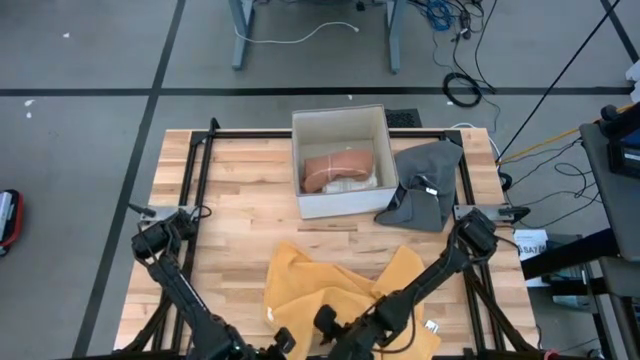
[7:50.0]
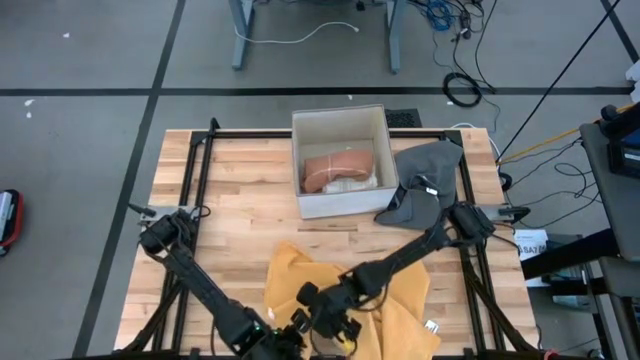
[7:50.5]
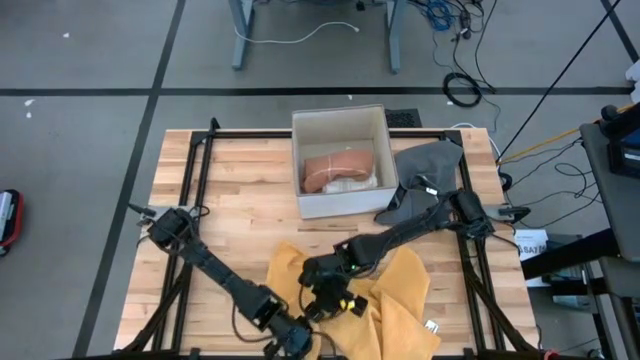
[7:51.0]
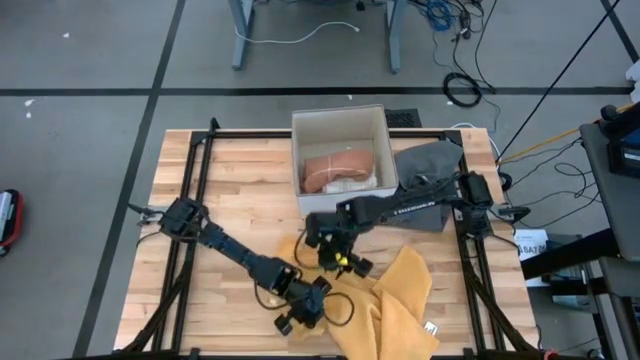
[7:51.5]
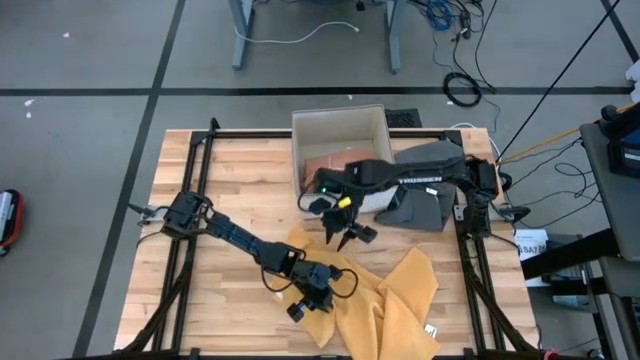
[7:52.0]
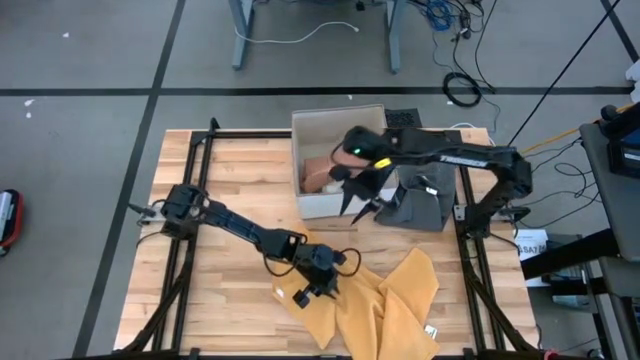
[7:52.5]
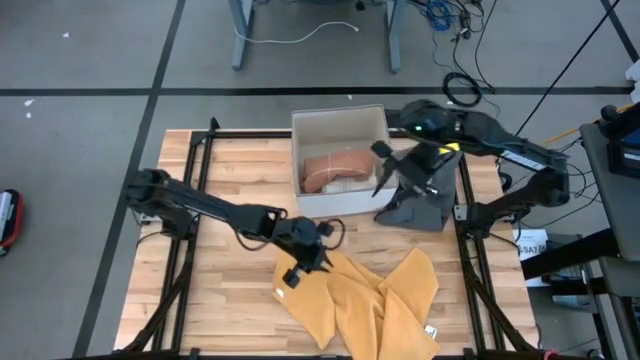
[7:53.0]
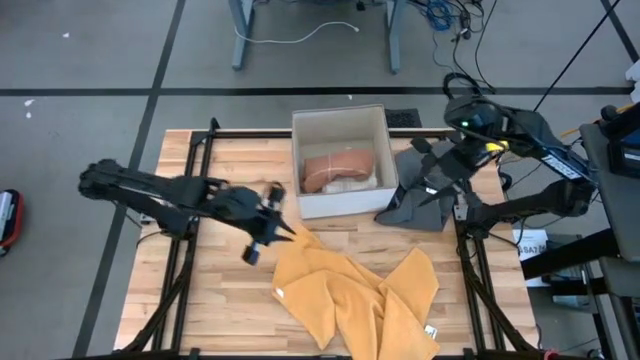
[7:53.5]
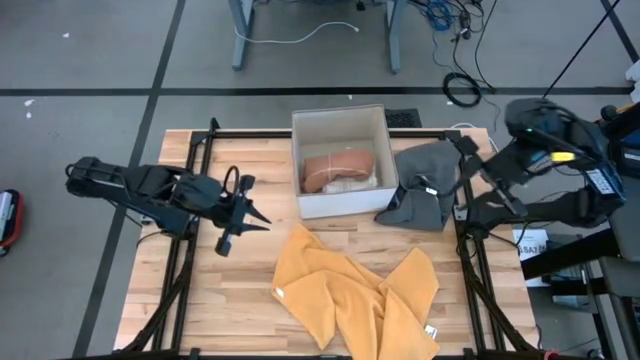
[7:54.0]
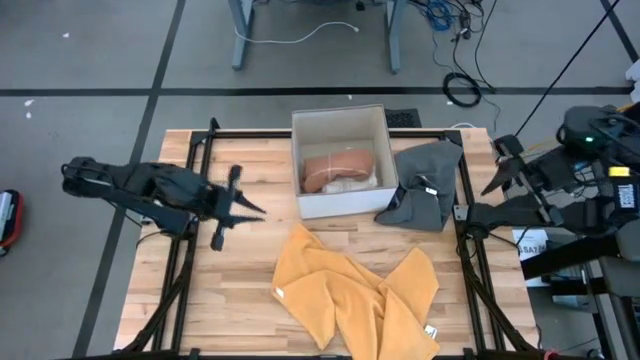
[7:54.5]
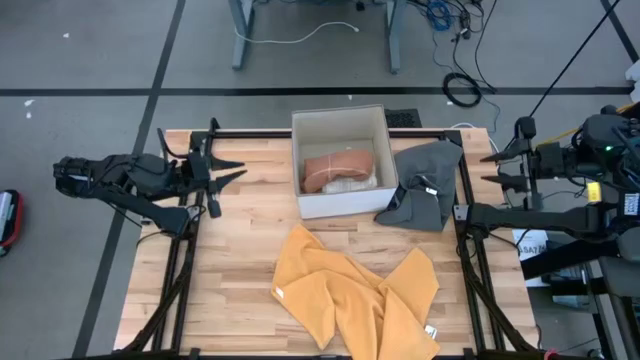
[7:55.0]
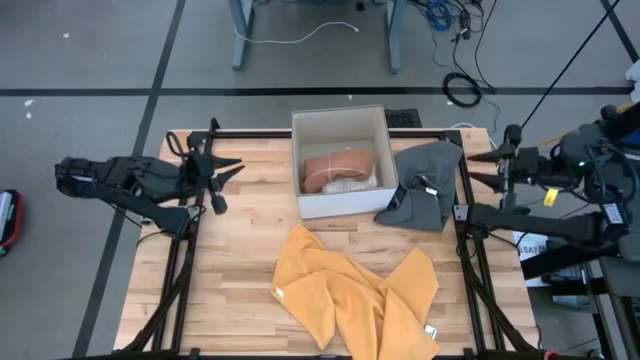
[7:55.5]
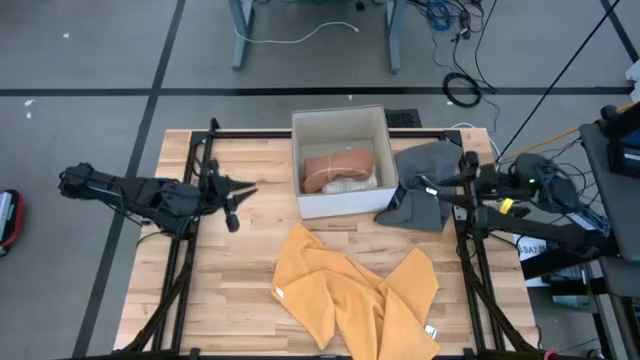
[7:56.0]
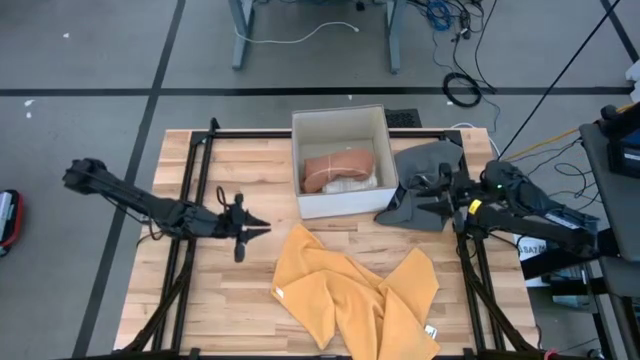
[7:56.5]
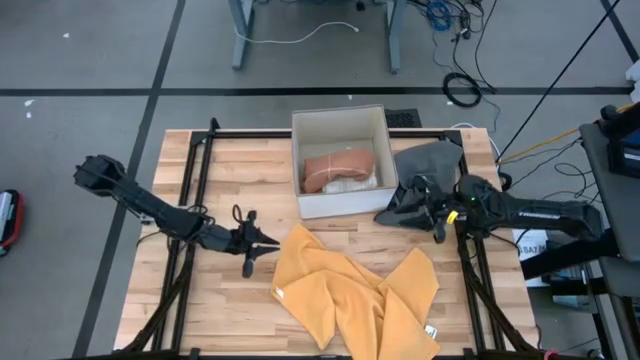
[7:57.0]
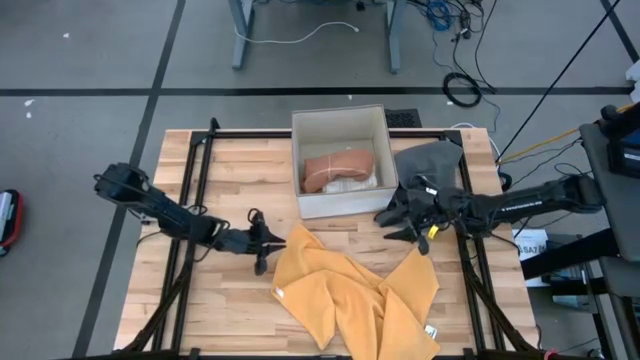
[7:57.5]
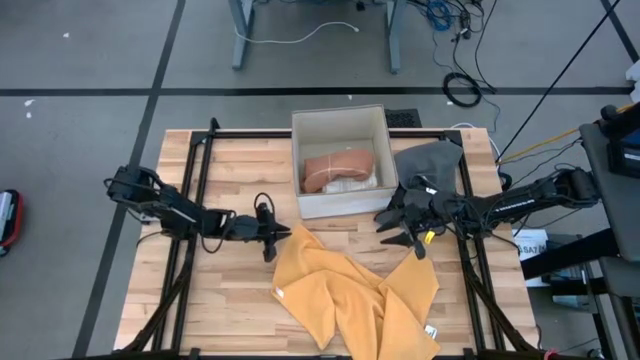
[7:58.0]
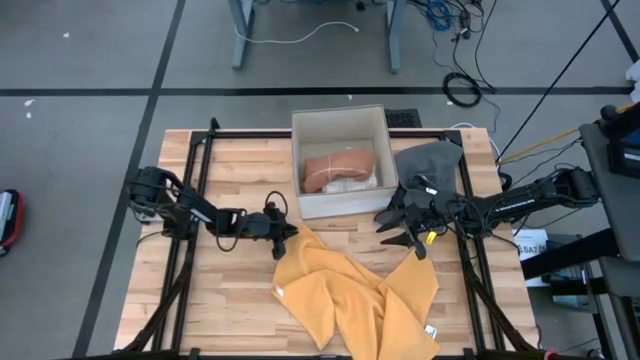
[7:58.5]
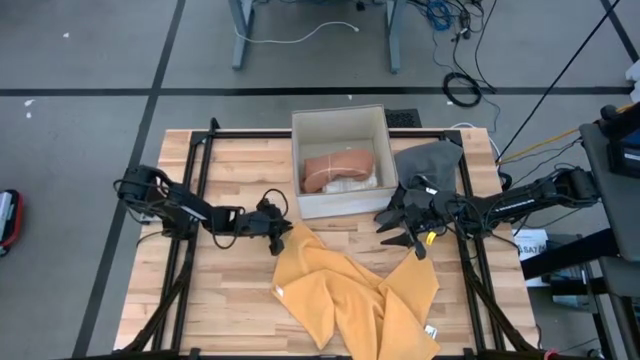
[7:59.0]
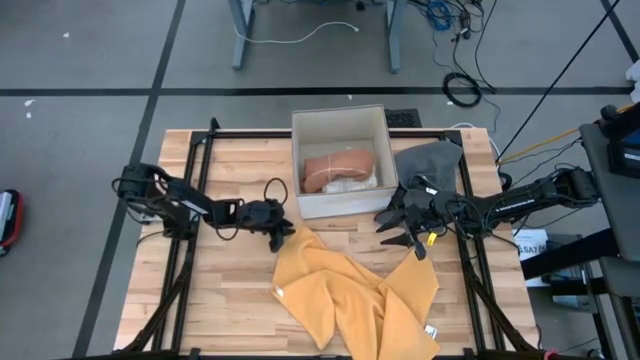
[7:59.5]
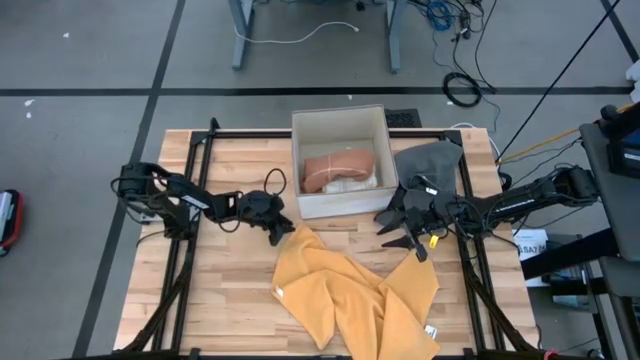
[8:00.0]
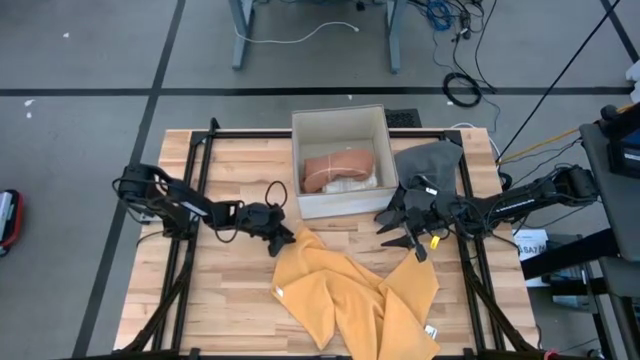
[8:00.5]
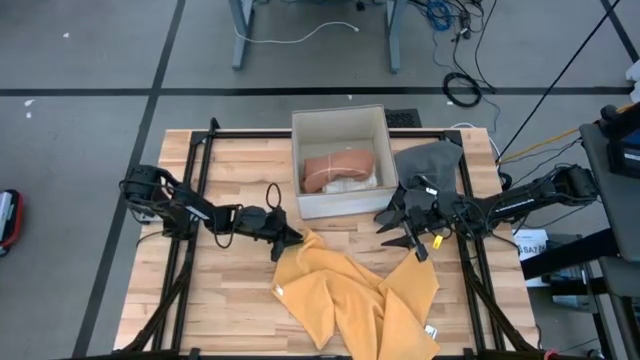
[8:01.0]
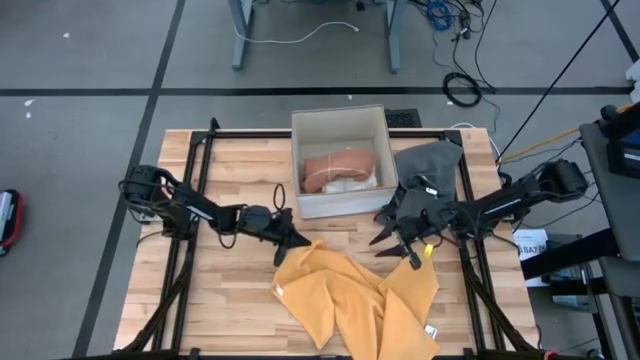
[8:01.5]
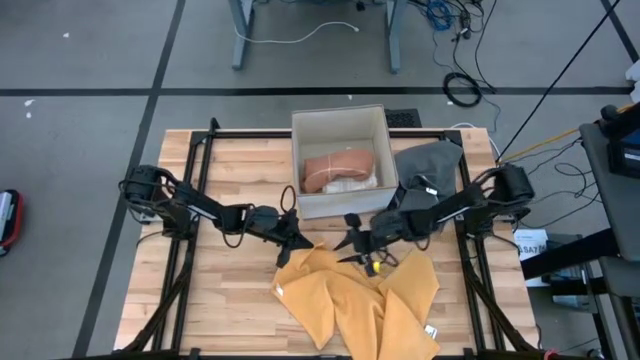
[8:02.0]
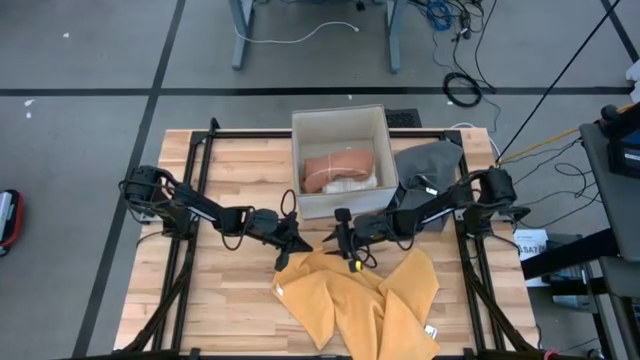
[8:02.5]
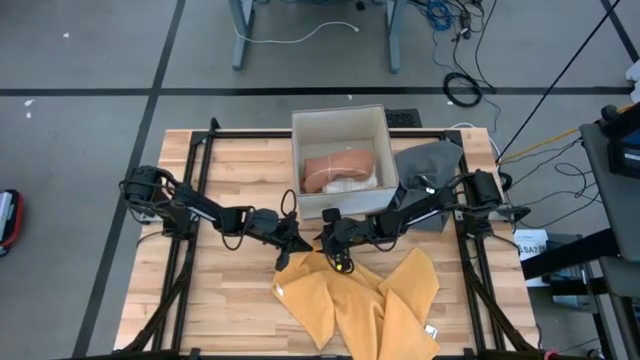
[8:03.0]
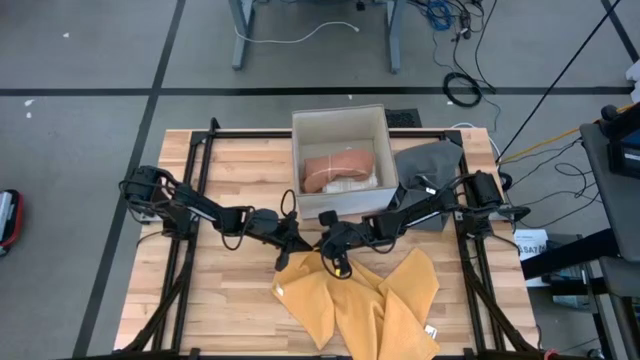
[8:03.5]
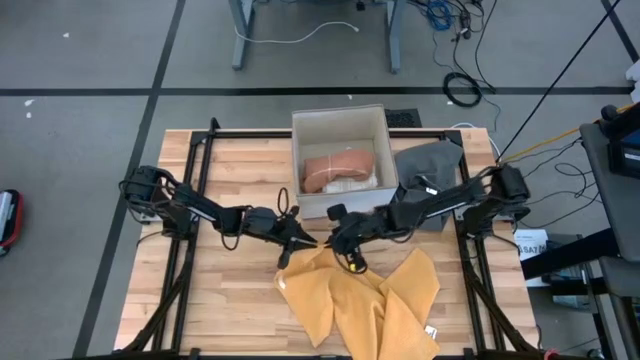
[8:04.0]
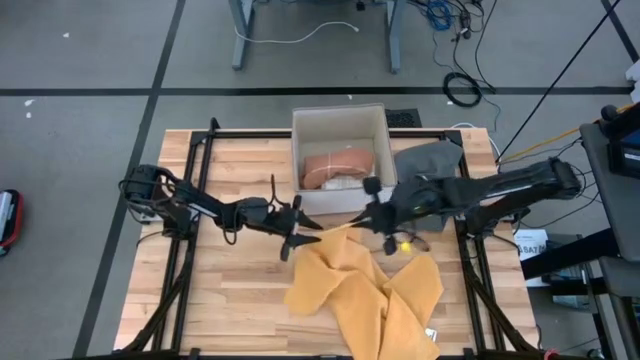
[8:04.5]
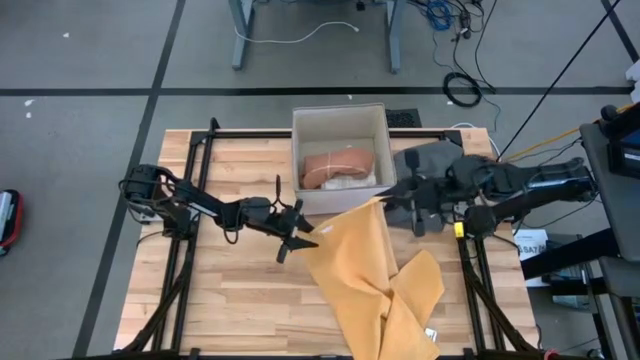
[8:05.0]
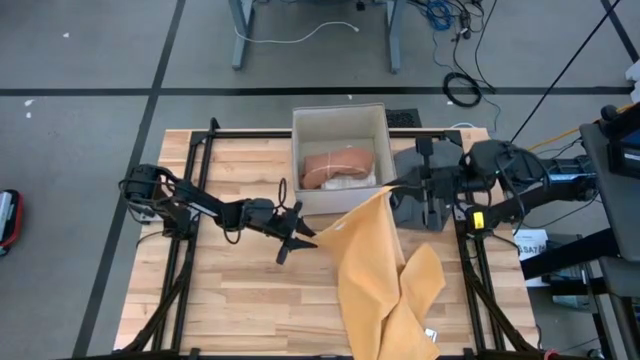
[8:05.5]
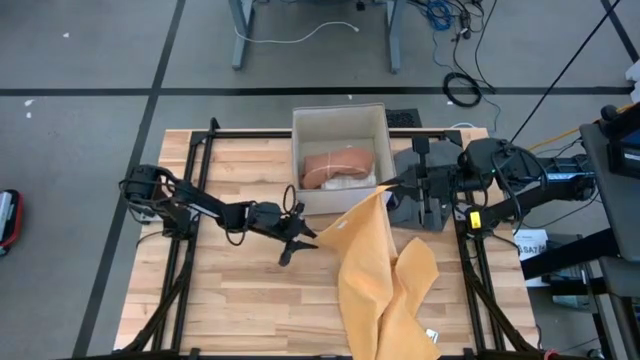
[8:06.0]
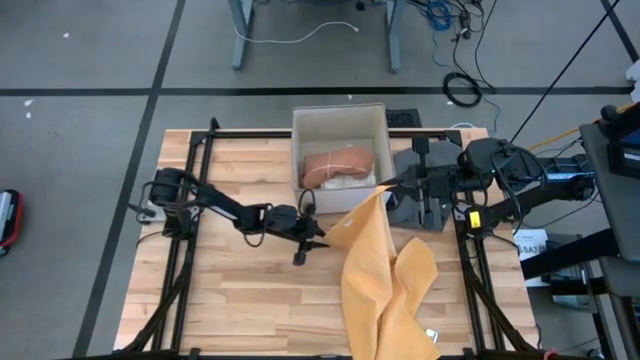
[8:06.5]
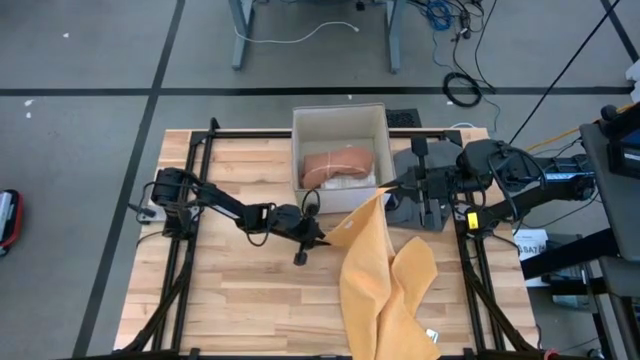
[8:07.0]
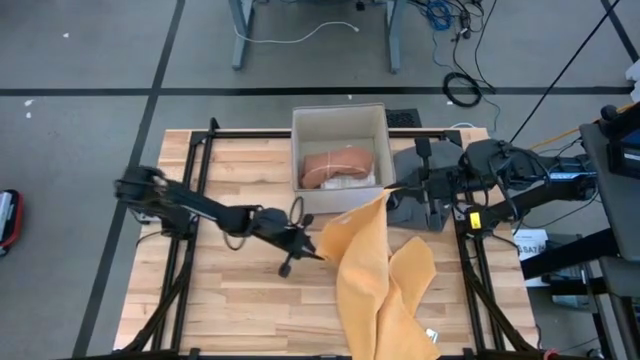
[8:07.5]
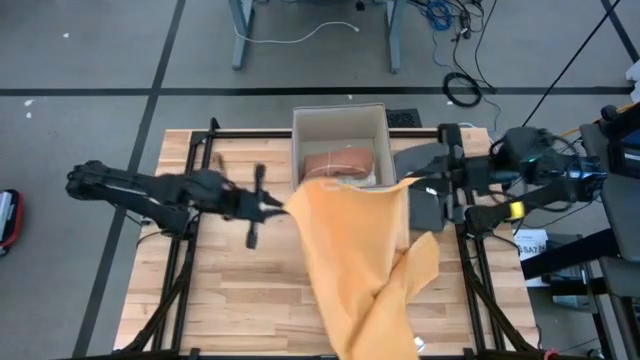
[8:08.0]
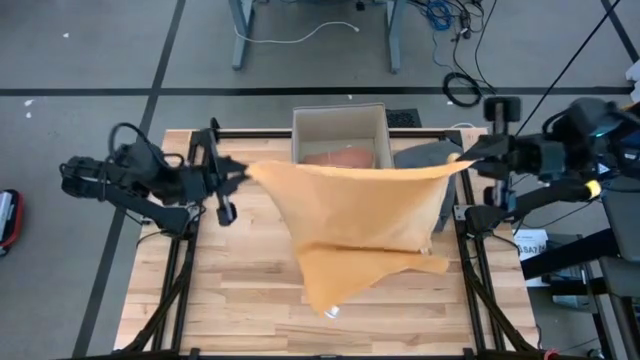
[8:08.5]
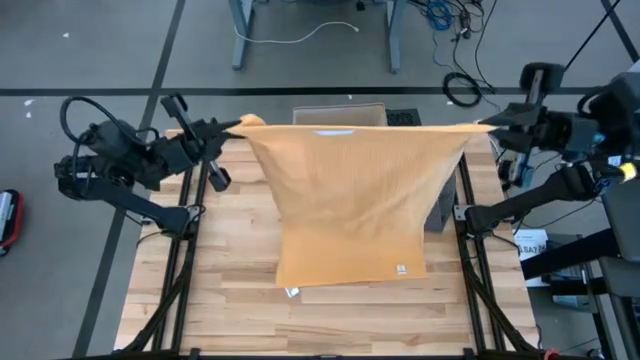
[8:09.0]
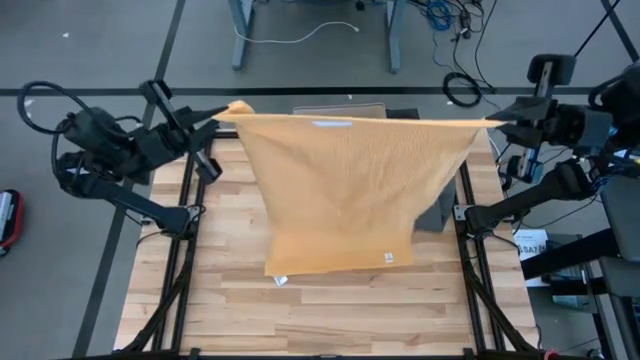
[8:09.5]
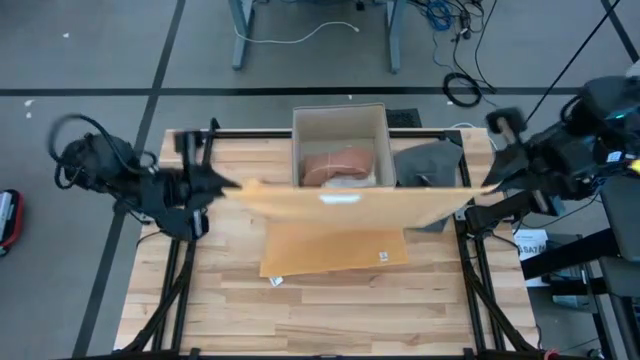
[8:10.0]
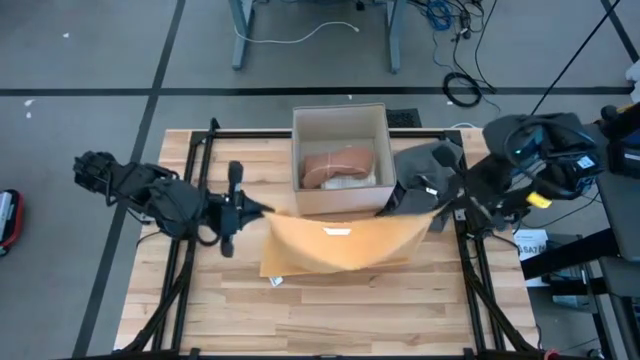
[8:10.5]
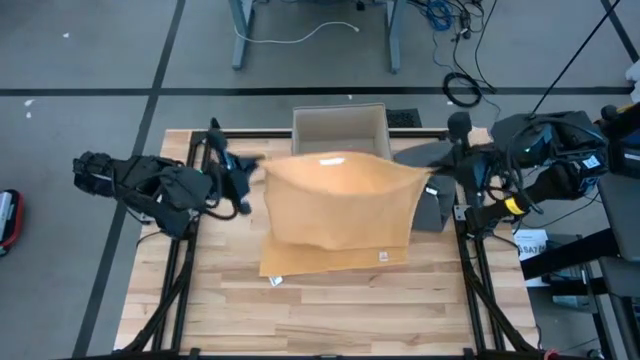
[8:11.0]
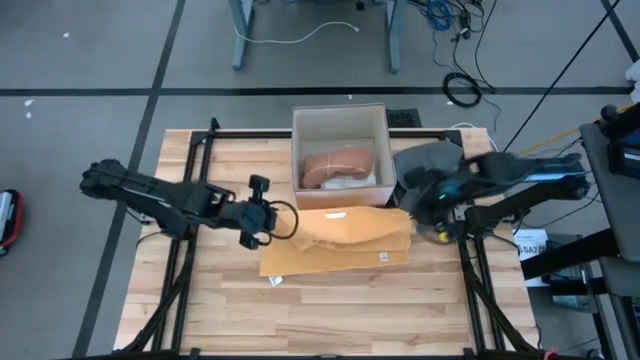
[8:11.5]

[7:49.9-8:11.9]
Task: Fold towel
Fold the orange towel
